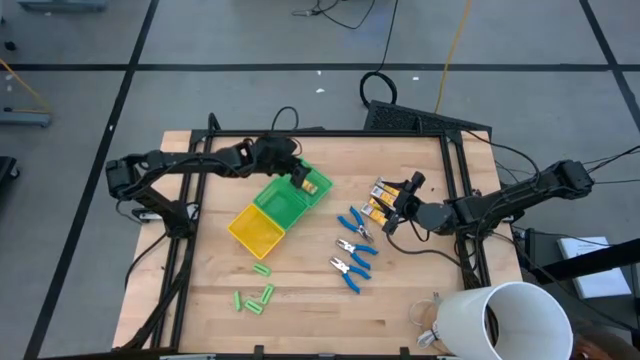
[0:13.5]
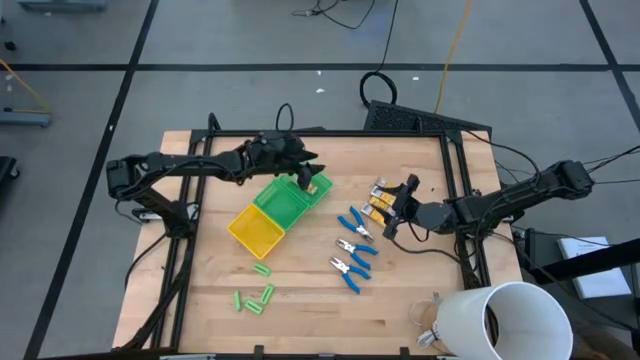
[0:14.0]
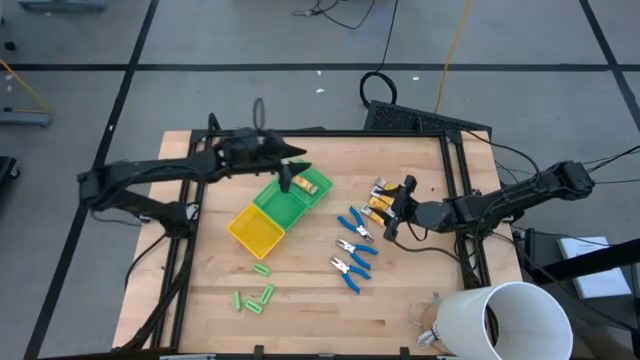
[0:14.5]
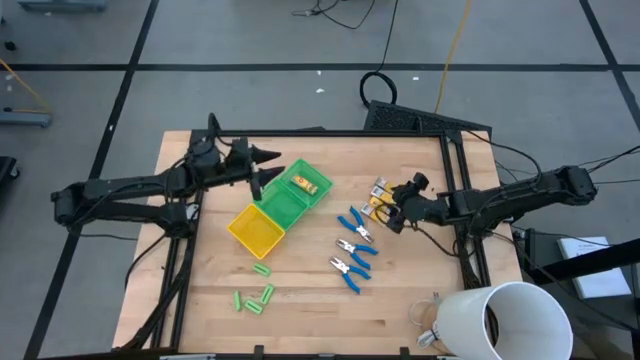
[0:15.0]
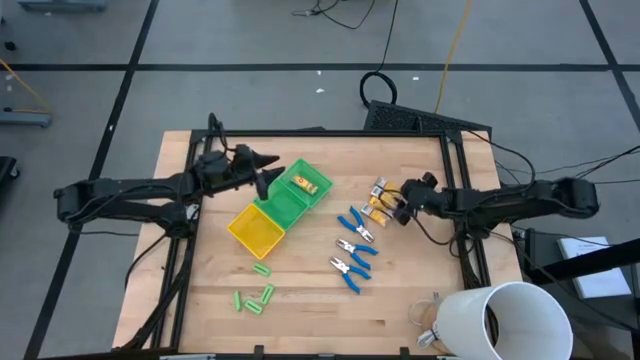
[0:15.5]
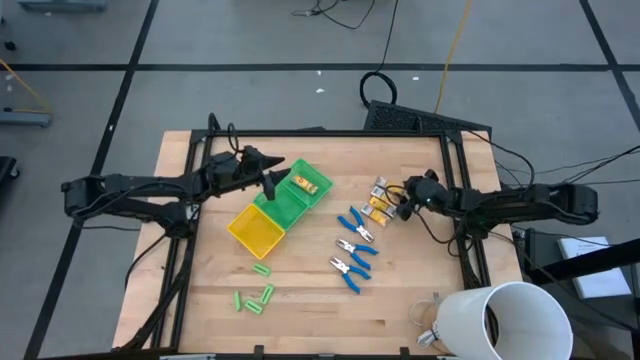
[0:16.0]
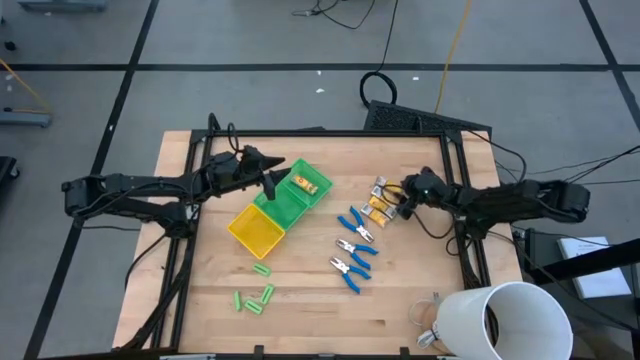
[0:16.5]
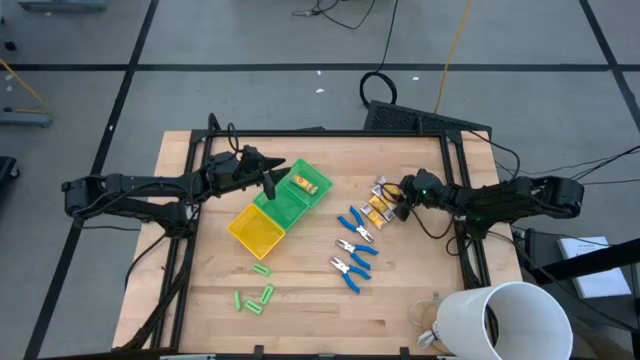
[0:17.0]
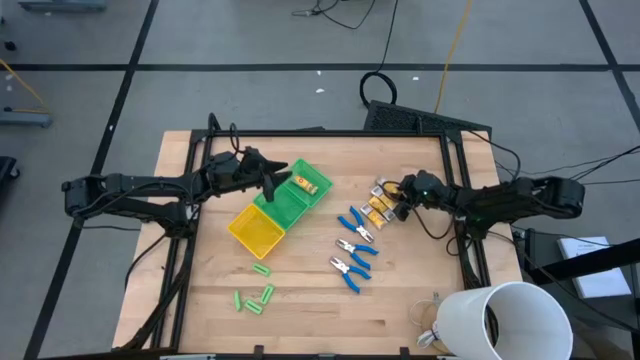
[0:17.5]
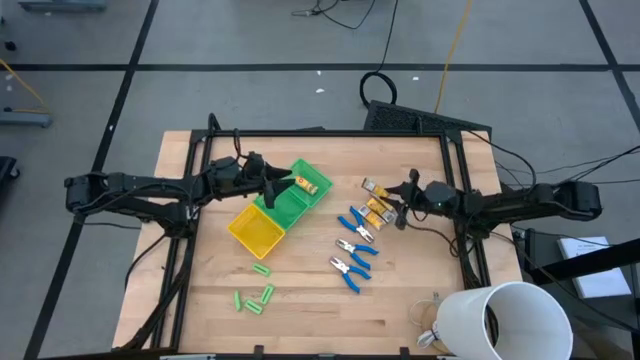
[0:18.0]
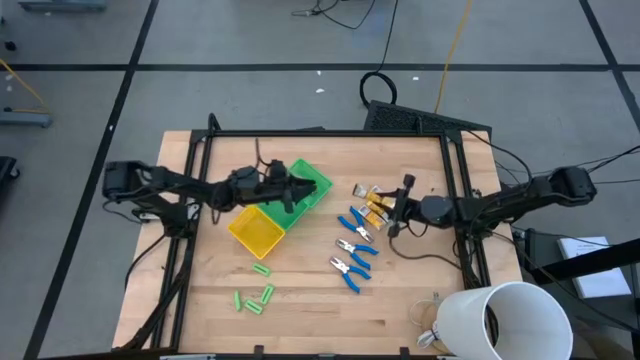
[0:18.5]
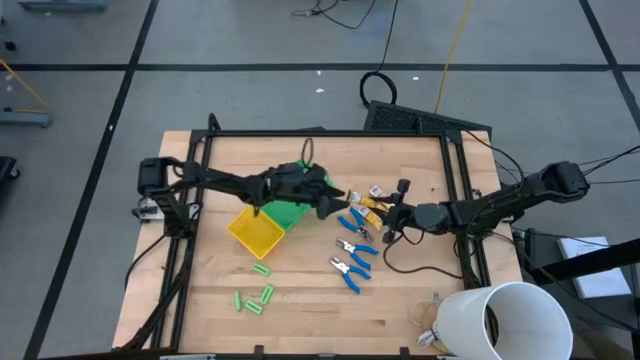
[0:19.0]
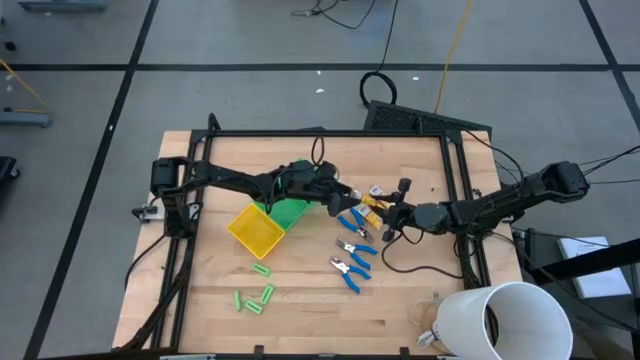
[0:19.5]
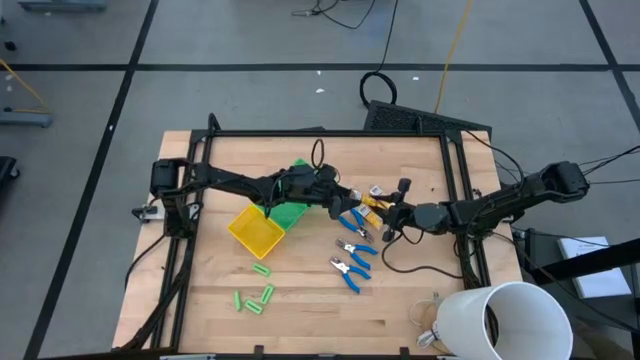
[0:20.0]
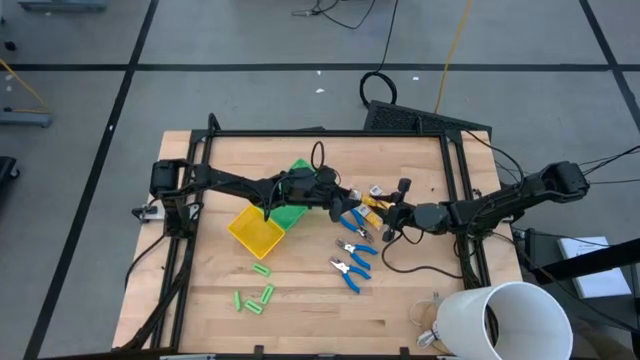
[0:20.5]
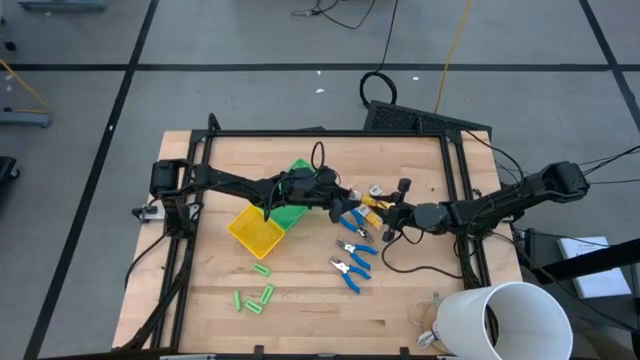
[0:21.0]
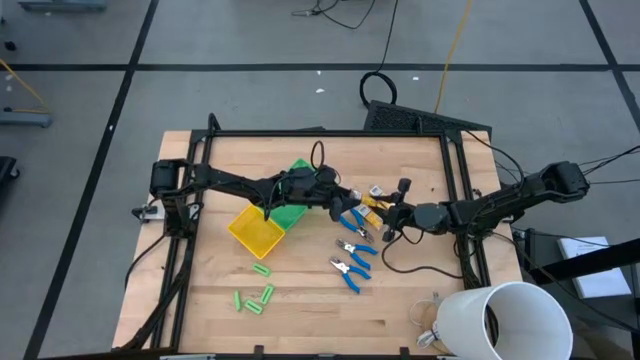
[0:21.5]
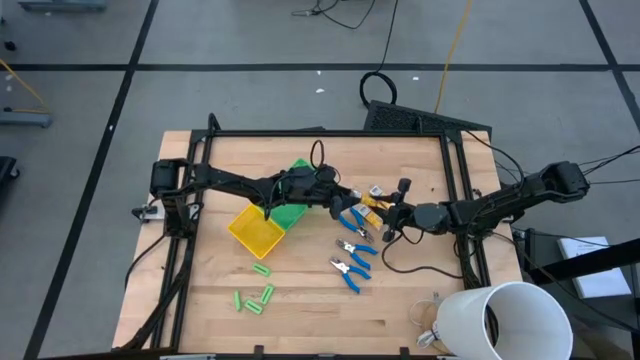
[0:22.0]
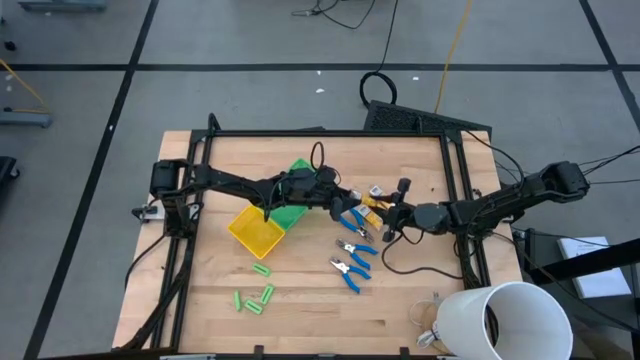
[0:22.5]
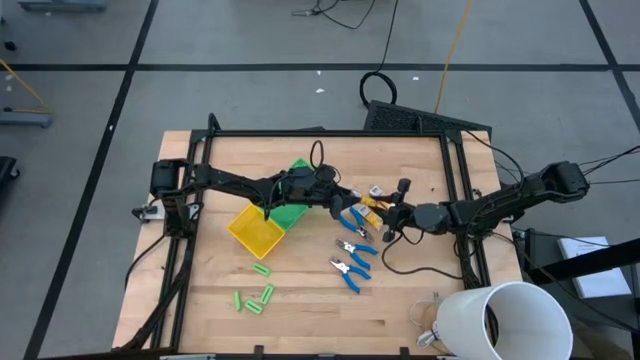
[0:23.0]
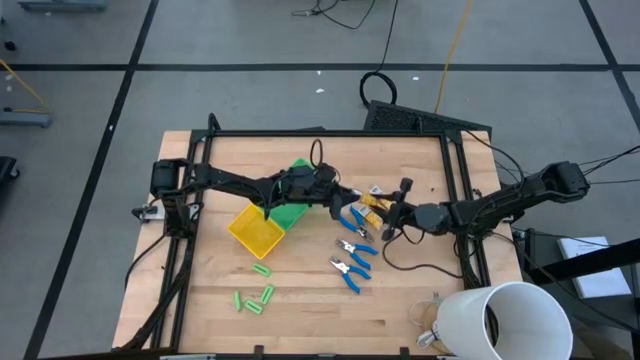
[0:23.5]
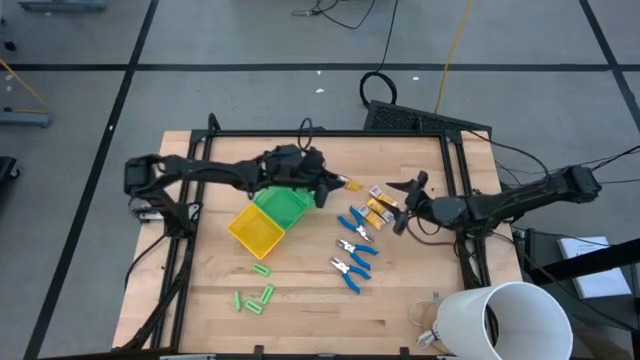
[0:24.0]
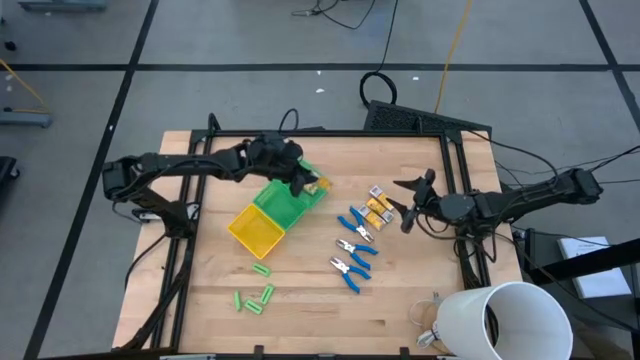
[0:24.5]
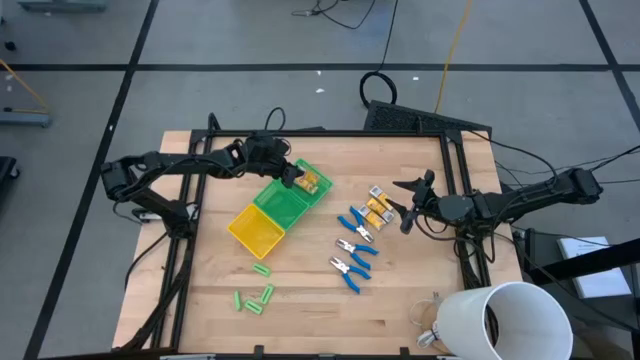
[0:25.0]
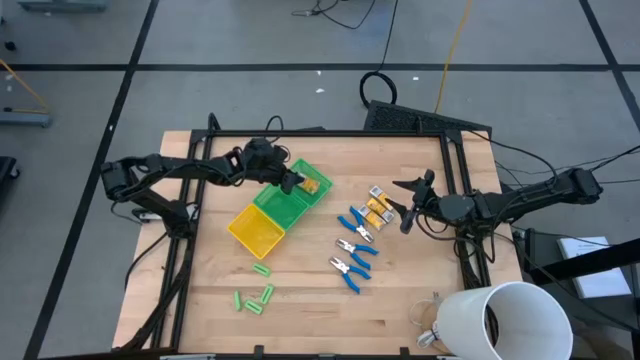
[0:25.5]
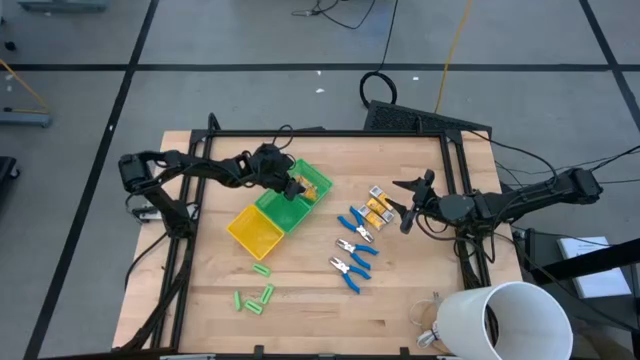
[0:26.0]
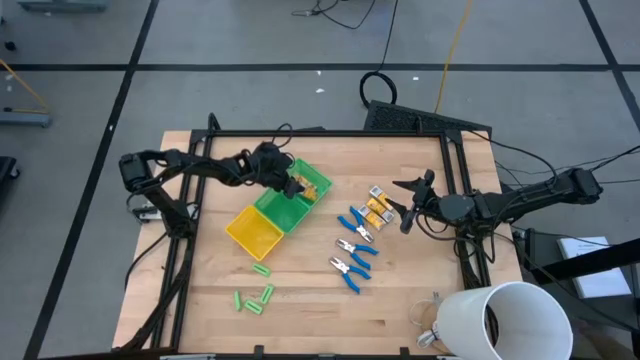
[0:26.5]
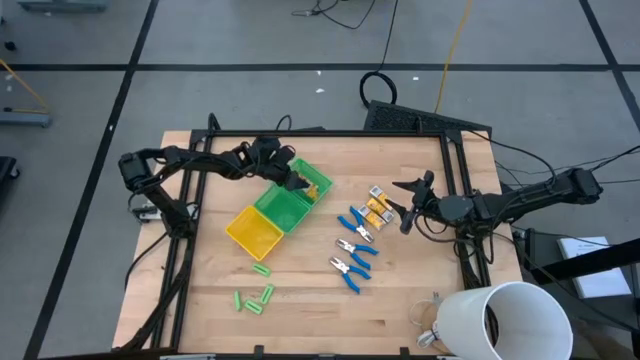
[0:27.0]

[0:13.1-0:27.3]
Task: Pick & Place School Supplies
Put the crayon box into the top green bin

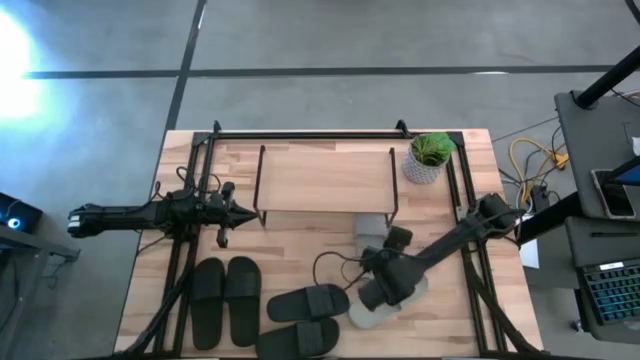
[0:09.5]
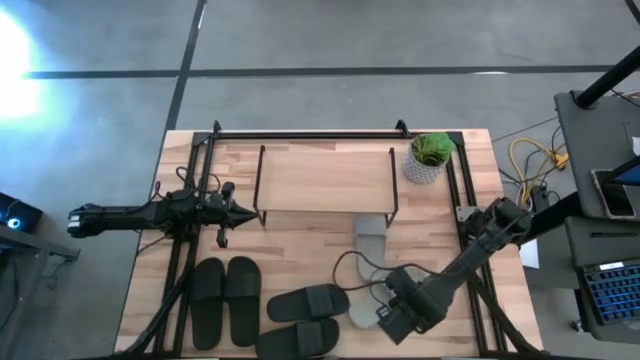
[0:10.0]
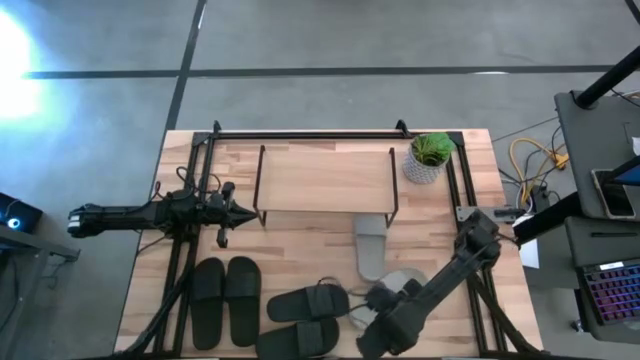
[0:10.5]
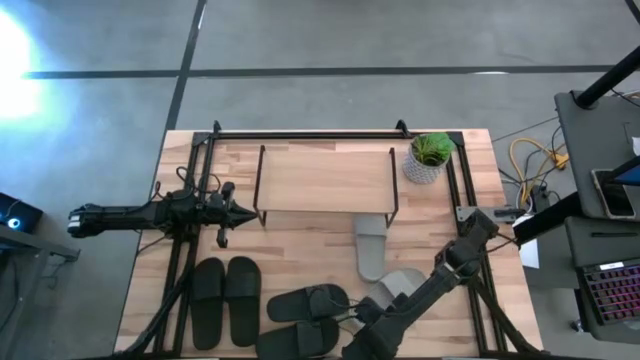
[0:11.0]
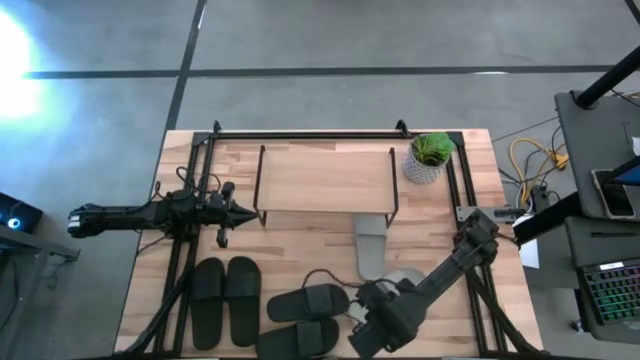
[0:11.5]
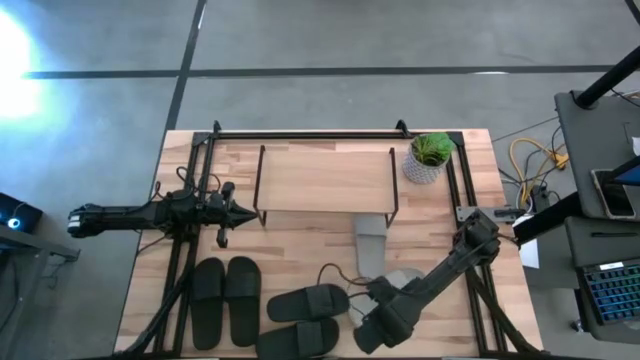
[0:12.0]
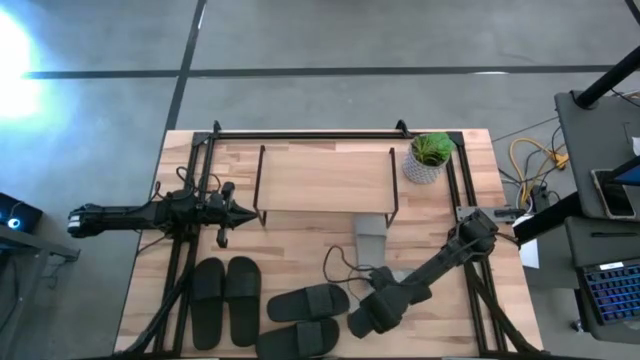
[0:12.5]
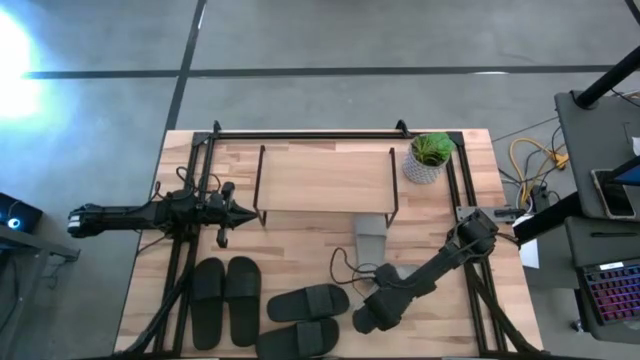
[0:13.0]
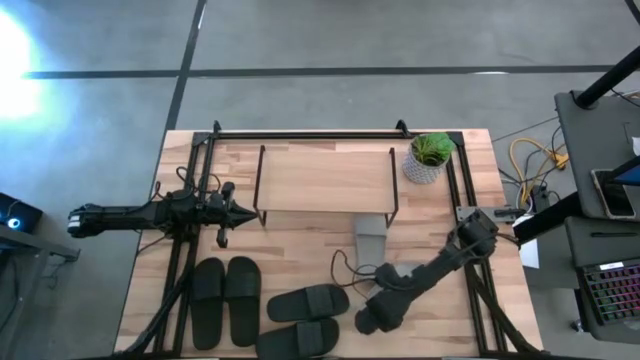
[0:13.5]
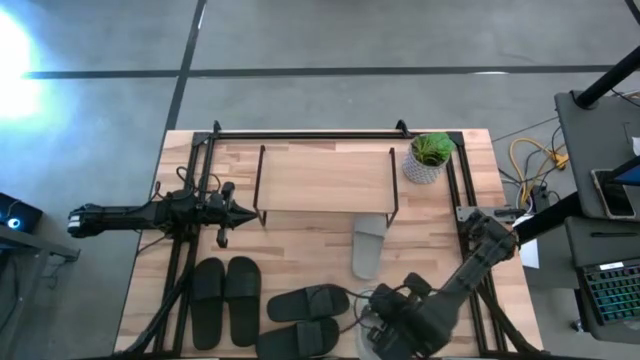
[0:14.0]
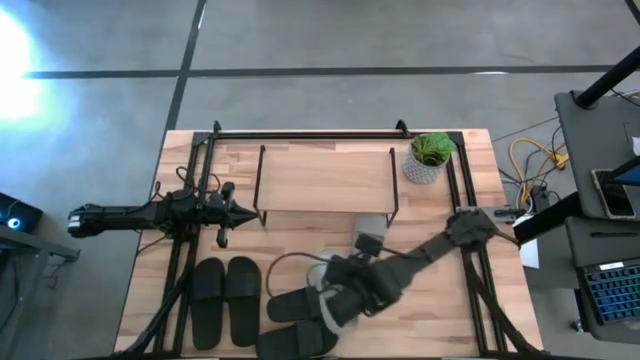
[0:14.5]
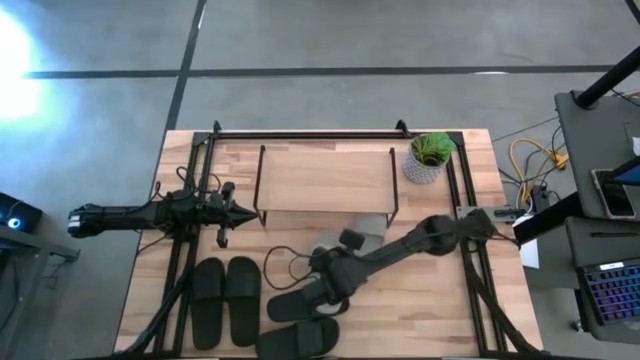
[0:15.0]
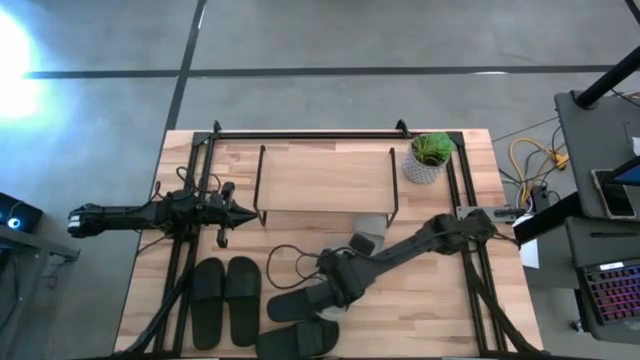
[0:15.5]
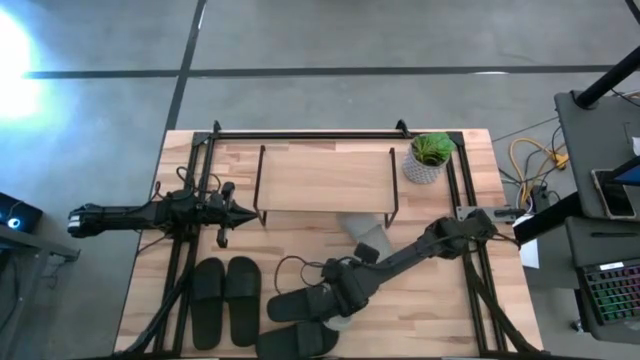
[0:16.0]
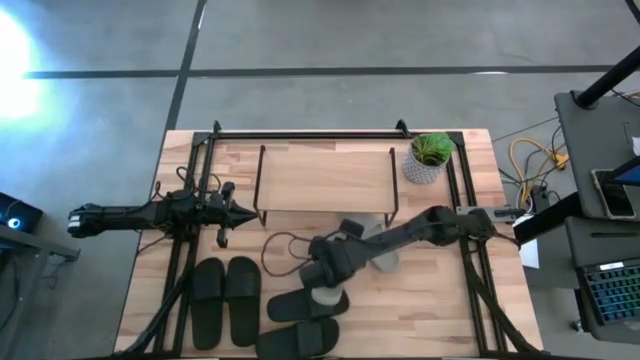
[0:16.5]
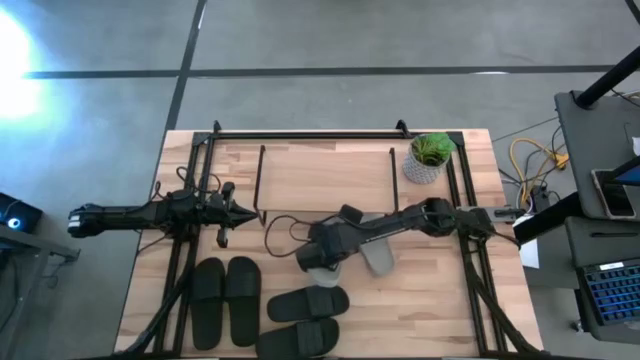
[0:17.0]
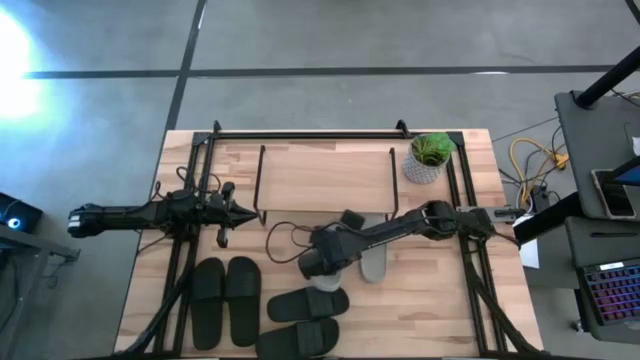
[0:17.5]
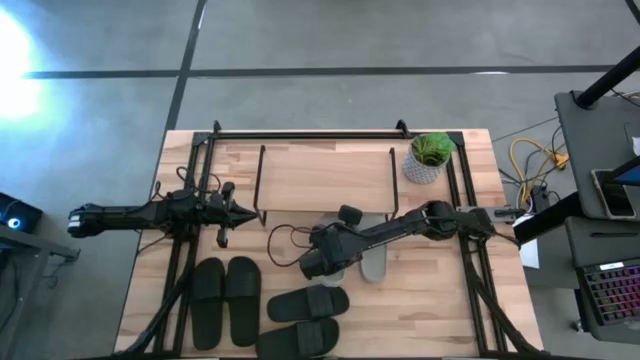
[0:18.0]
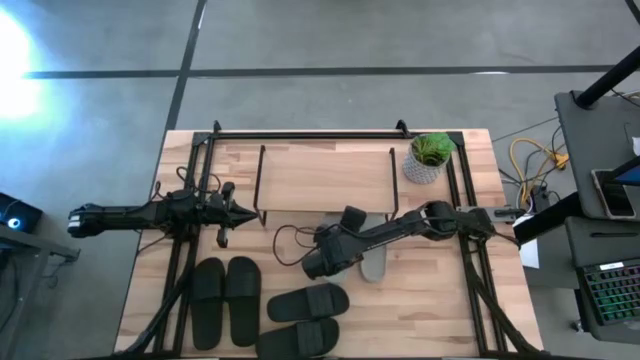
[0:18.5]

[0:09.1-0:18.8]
Task: Pick and place slides into the shelf
Put the grey slide under the shelf
